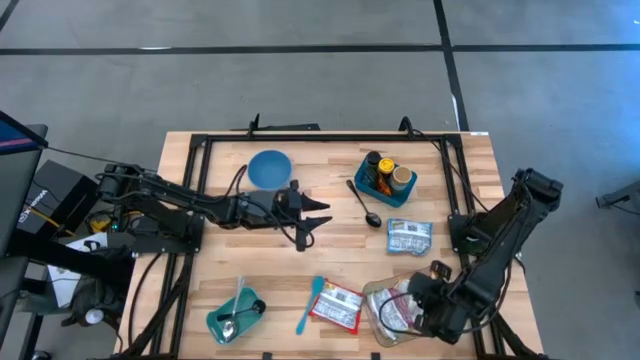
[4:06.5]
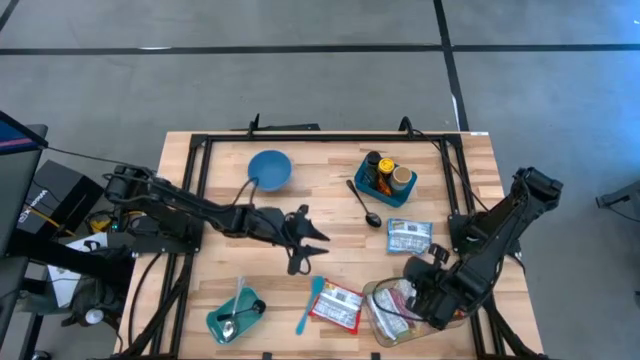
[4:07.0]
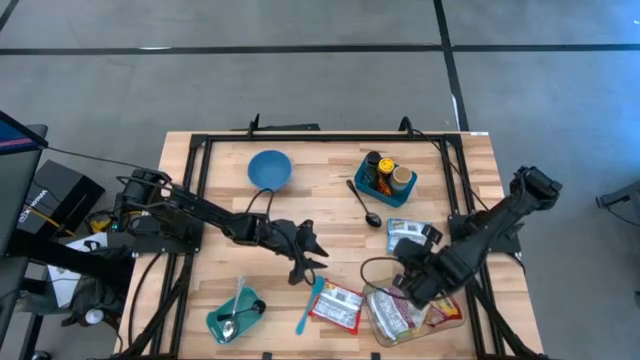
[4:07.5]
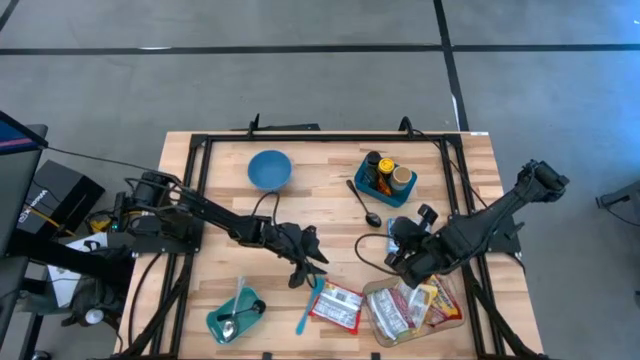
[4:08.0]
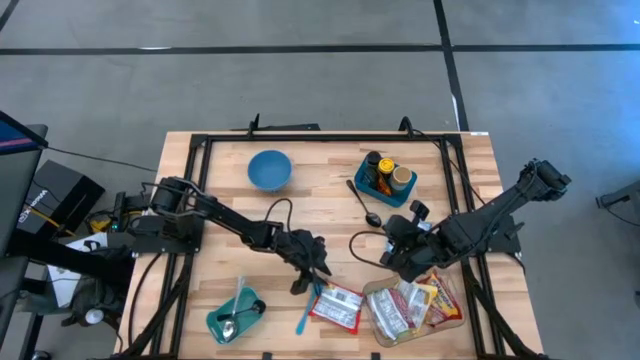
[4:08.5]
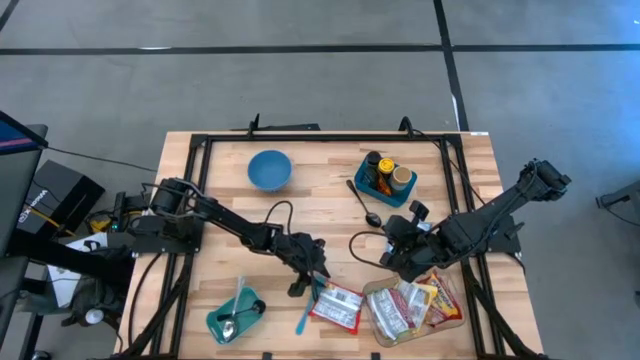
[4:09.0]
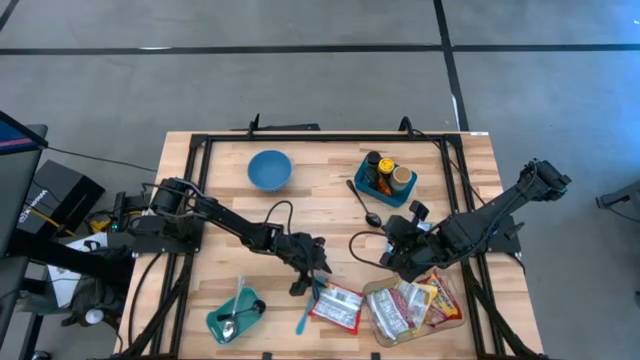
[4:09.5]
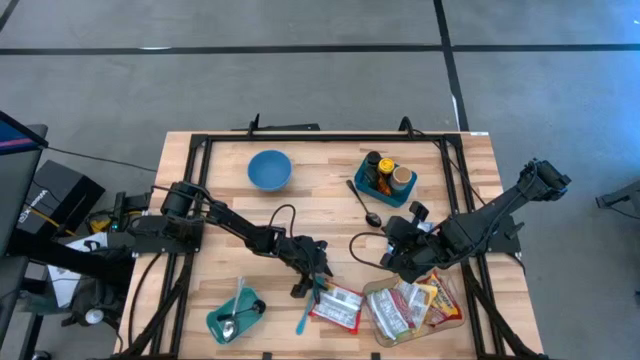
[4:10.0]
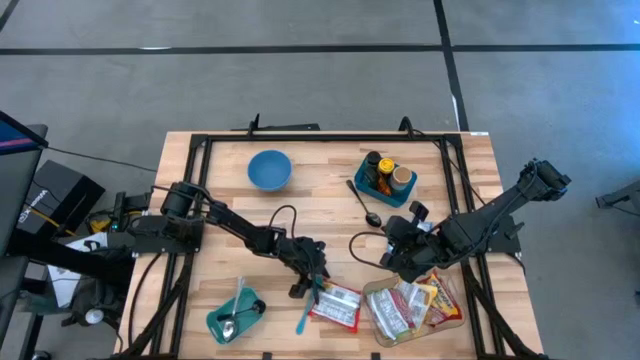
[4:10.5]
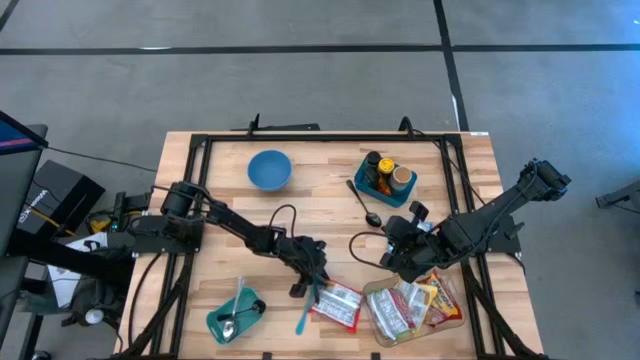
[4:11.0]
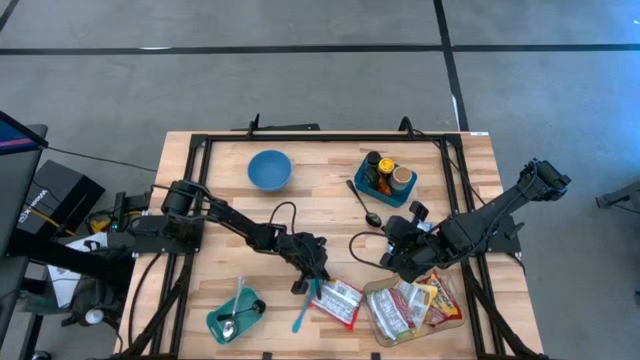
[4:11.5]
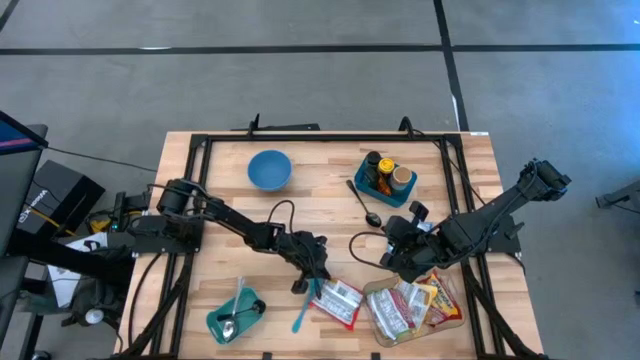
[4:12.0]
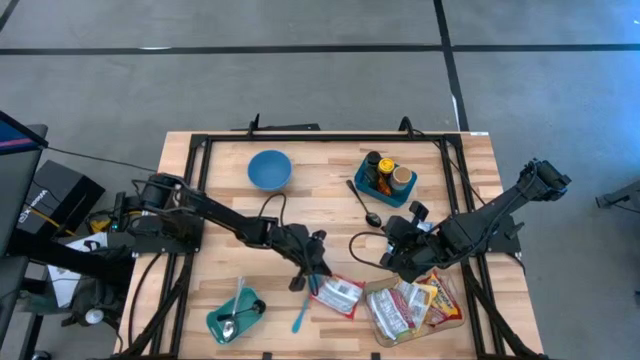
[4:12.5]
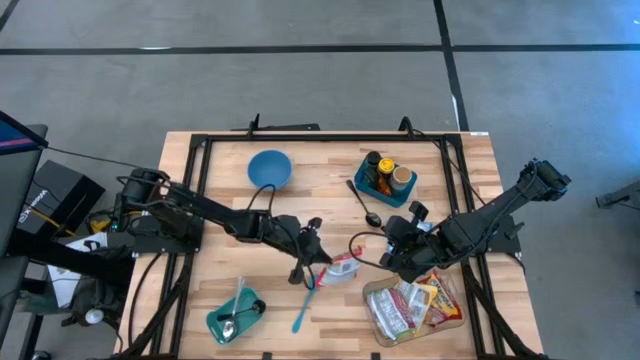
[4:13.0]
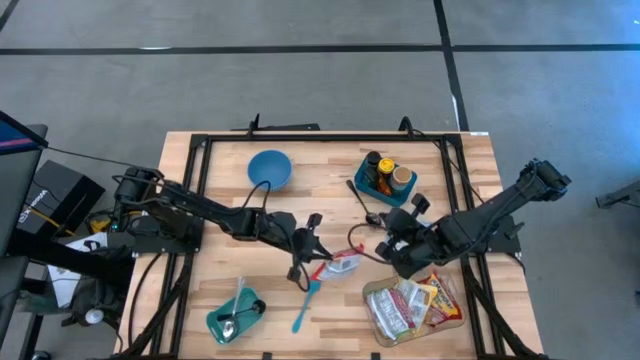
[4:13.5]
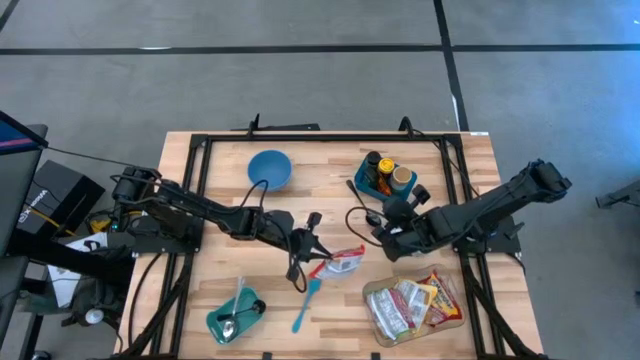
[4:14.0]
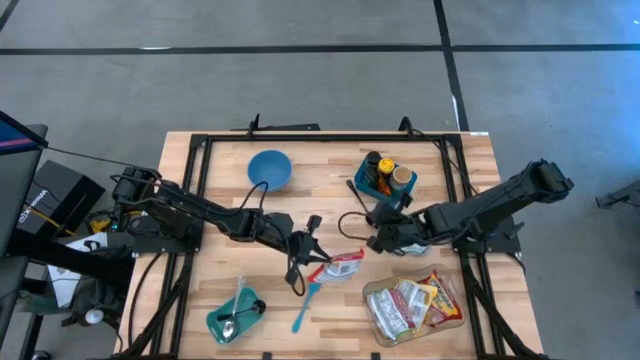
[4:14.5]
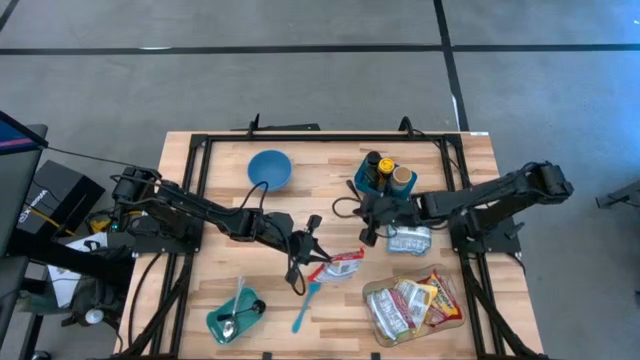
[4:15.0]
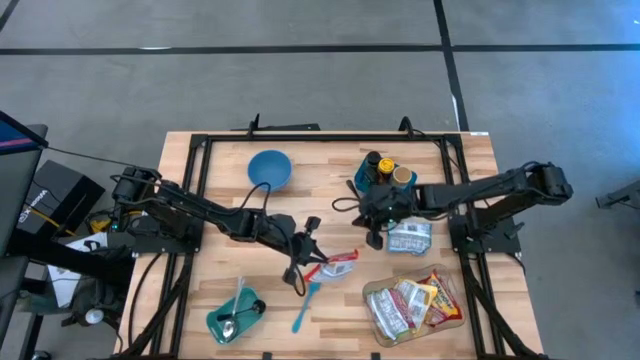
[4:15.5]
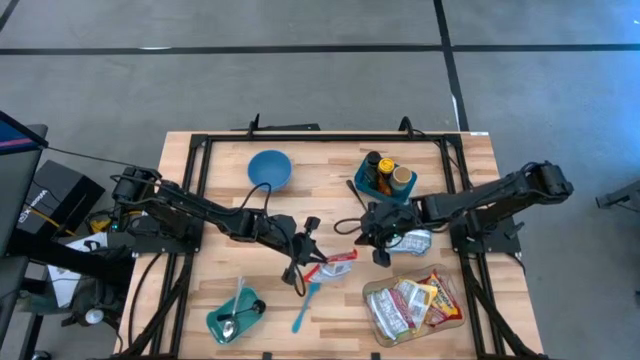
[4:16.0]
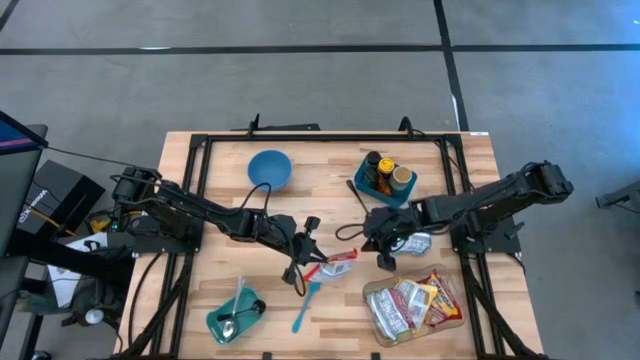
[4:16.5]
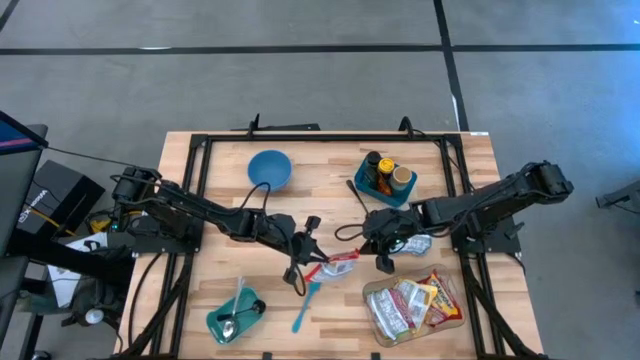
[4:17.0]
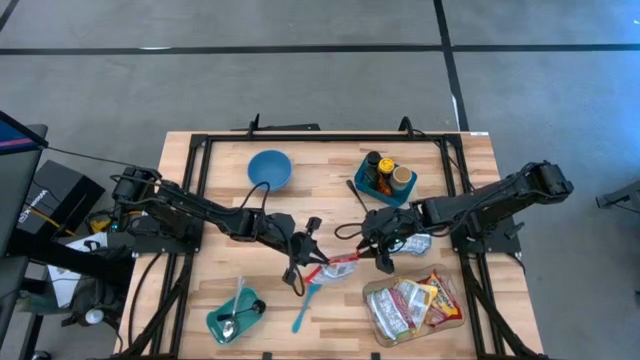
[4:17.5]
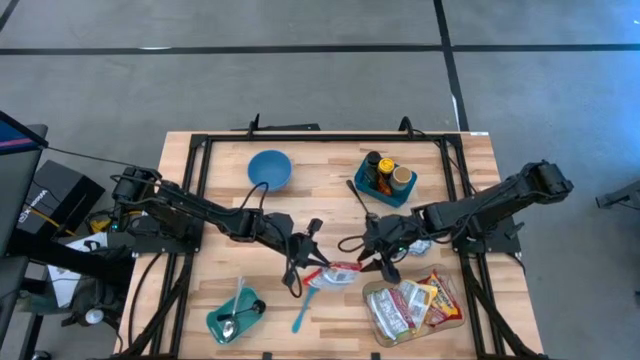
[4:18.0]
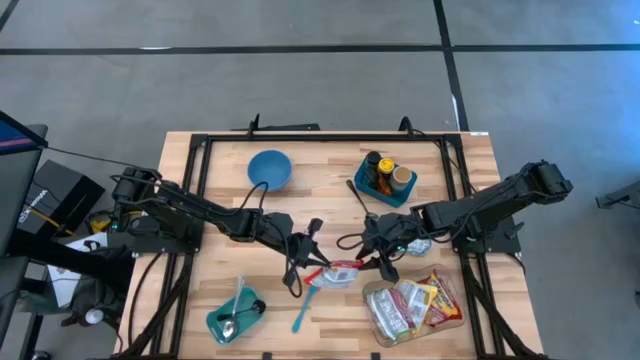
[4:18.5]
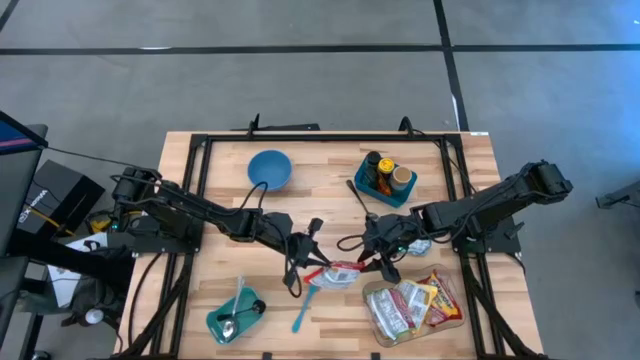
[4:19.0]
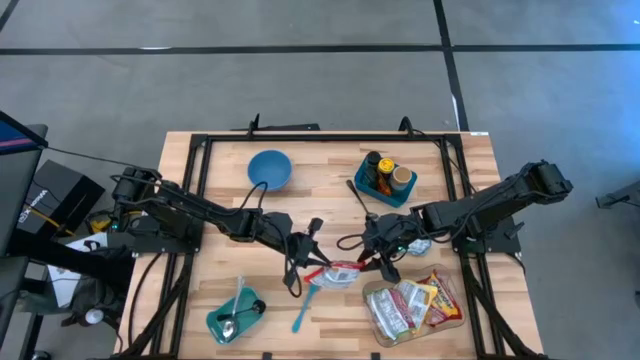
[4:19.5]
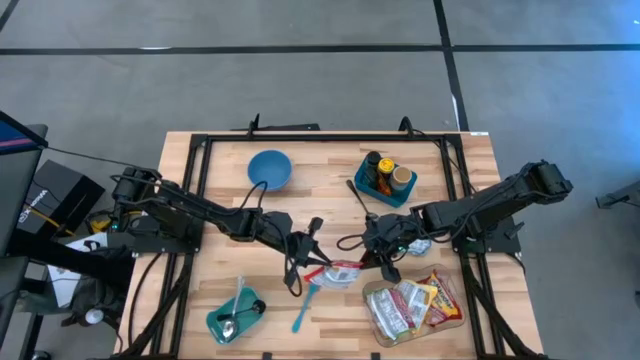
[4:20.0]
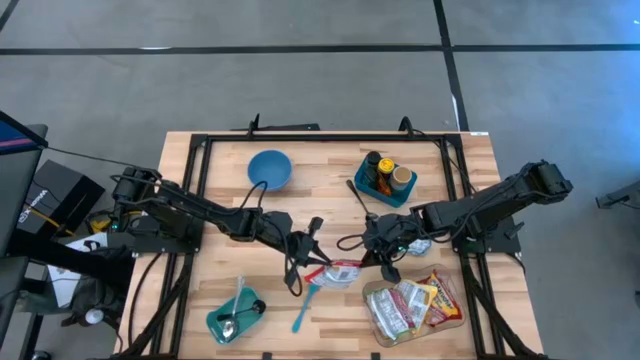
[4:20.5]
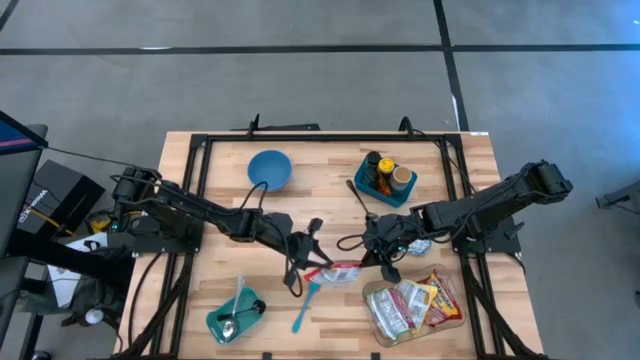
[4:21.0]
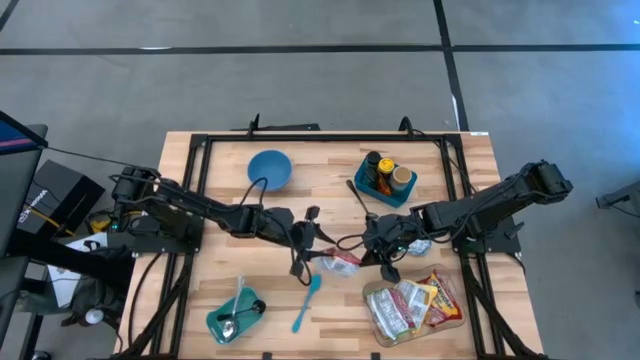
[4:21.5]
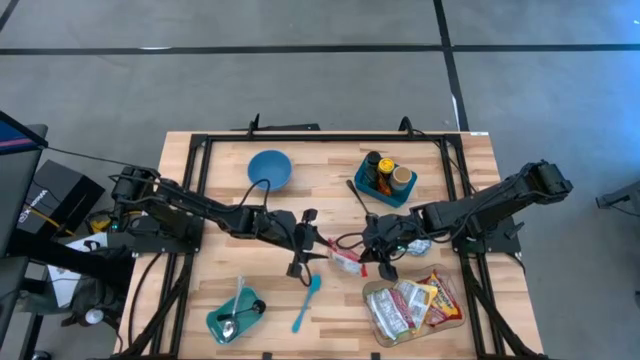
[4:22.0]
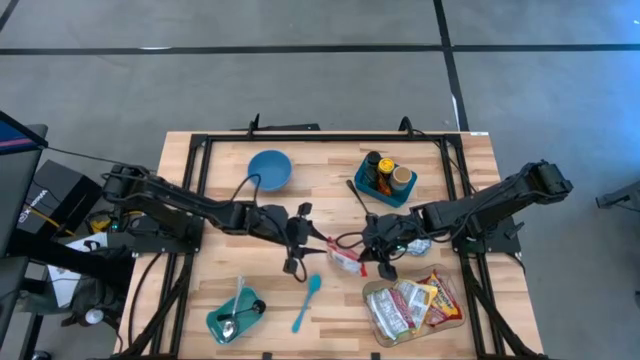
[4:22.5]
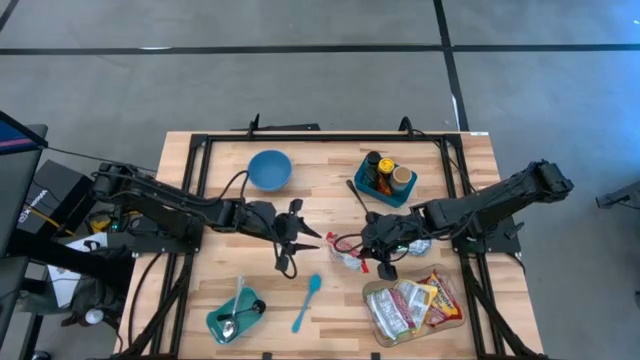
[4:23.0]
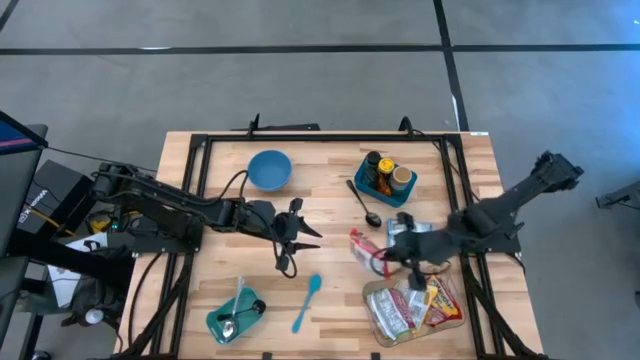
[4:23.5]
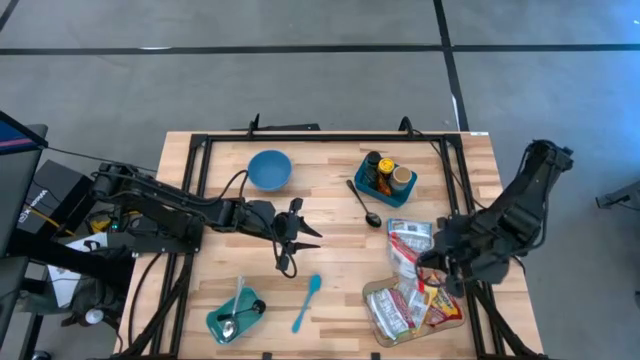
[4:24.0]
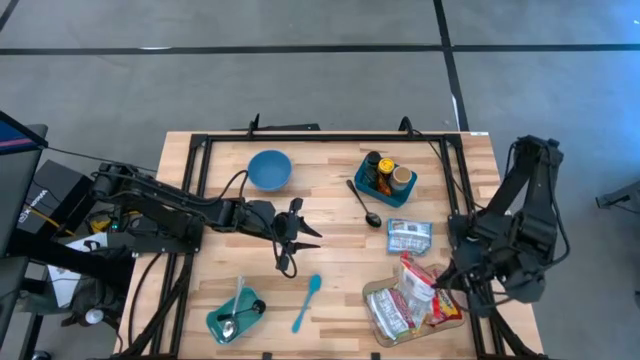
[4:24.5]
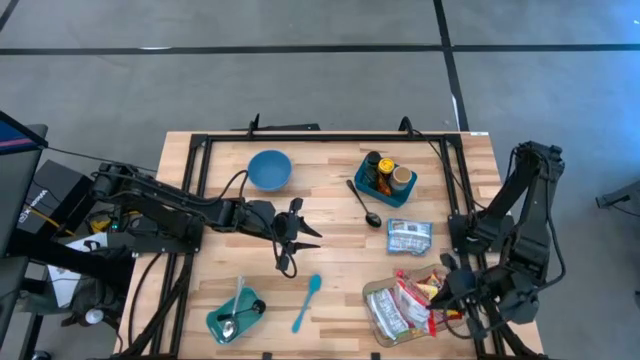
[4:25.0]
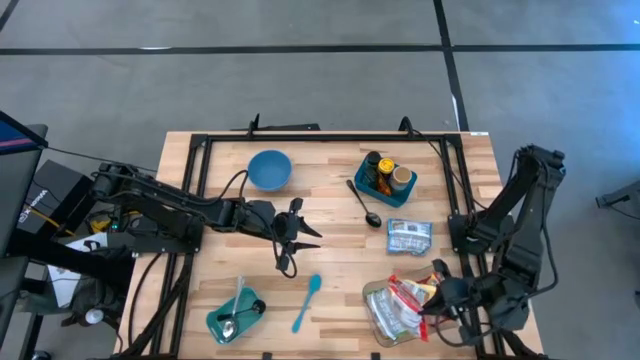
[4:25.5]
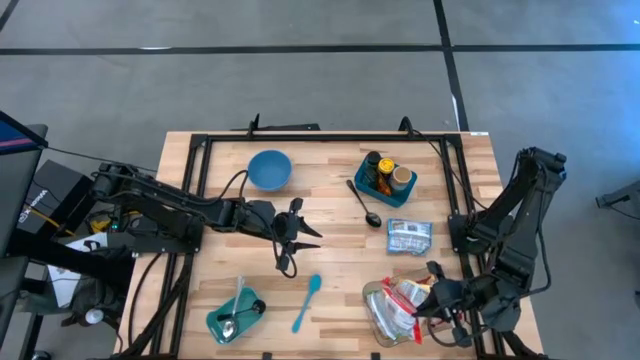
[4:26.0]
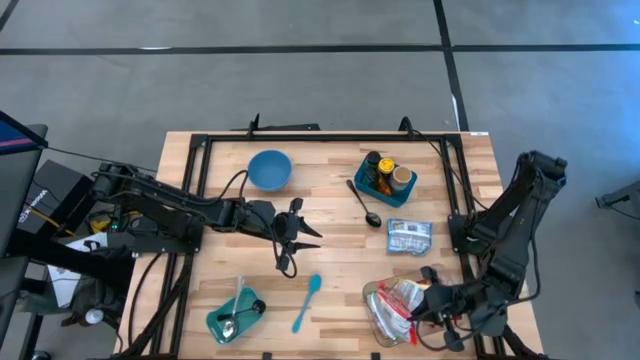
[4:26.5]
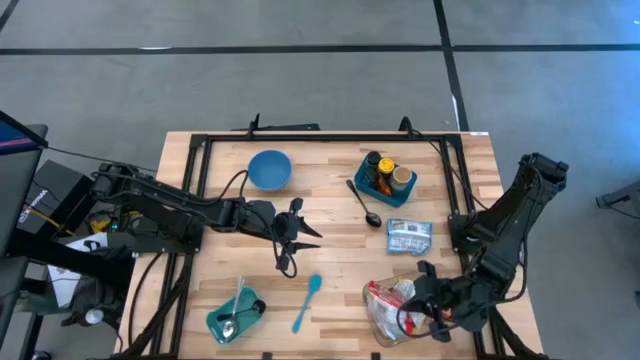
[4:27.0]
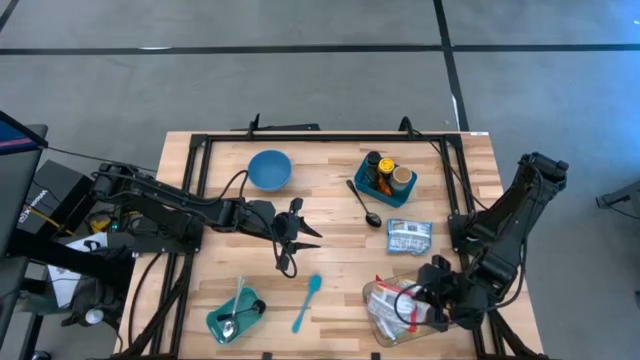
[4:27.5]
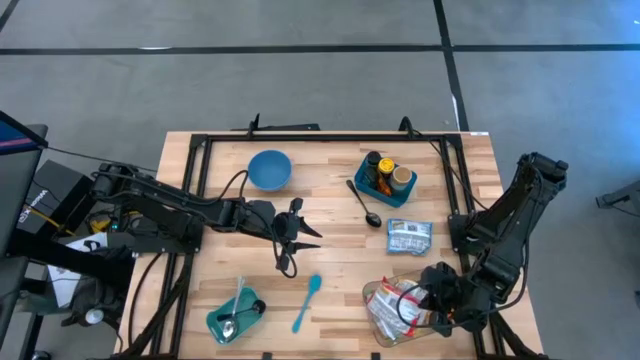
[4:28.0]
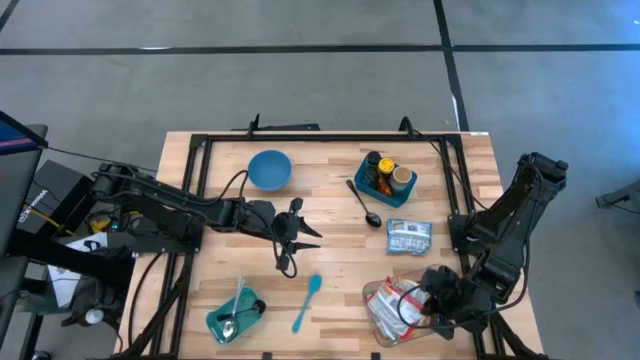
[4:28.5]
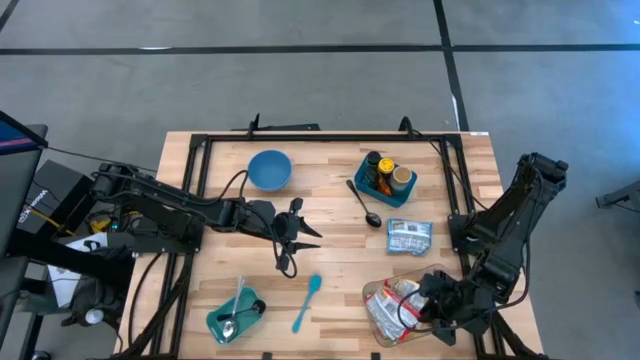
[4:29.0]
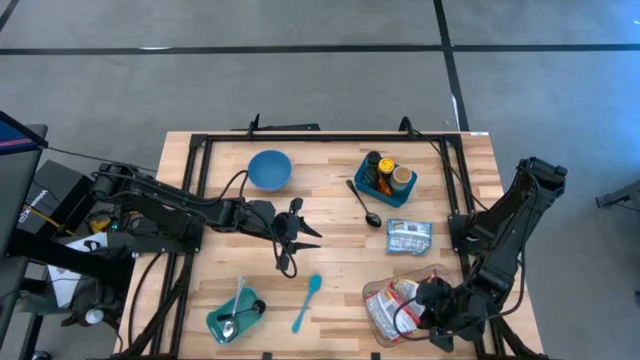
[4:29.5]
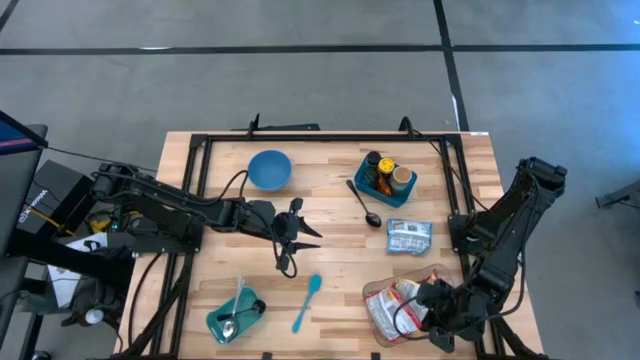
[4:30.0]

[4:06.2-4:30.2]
Task: Pick & Place Food Item
Put the red noodle pack into the transparent bin
